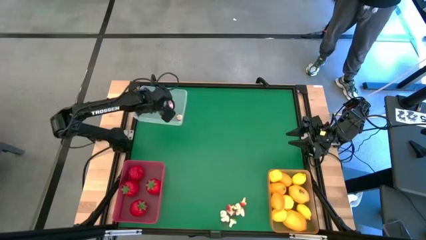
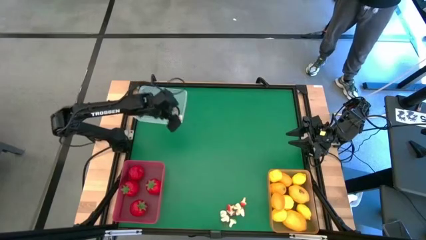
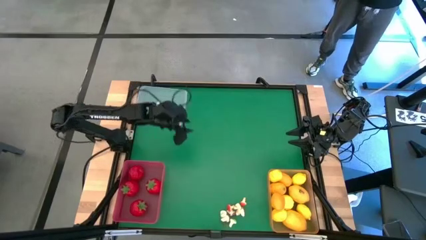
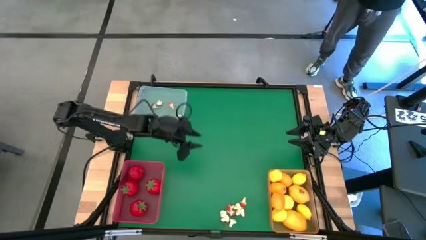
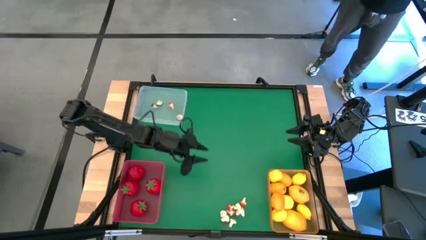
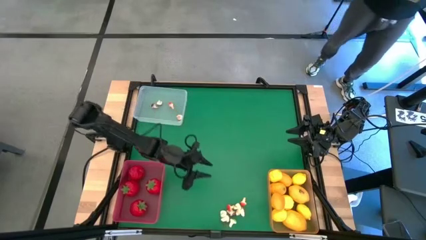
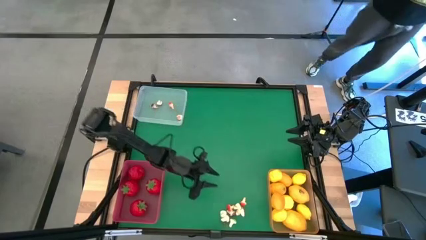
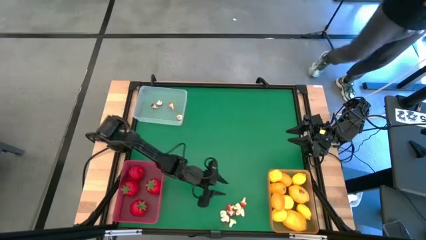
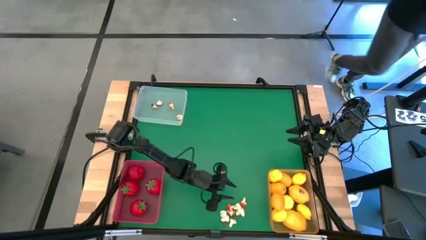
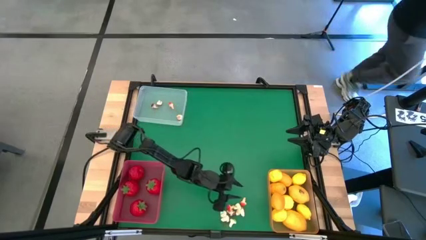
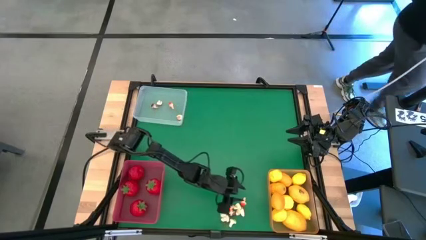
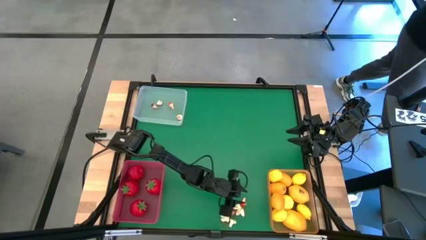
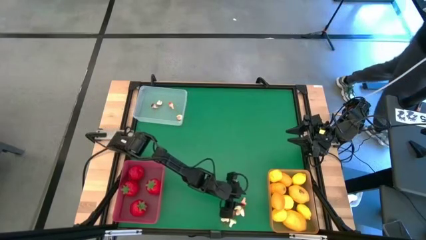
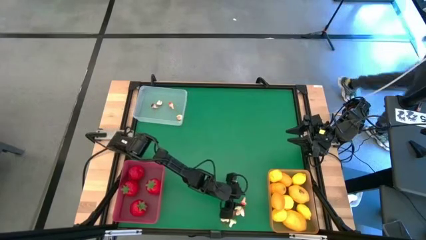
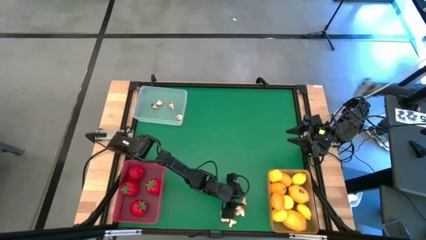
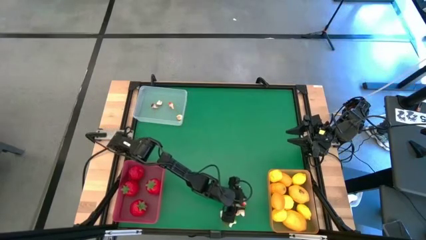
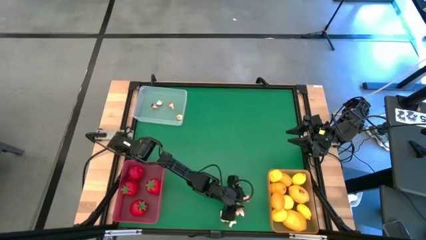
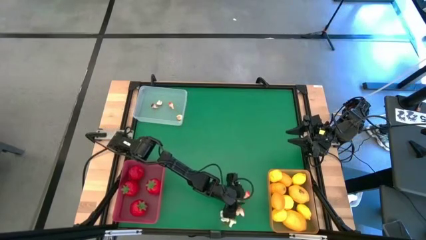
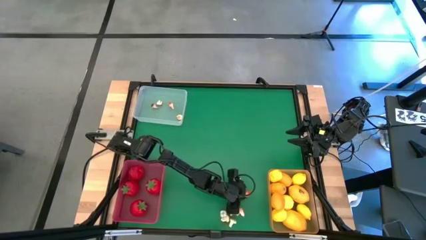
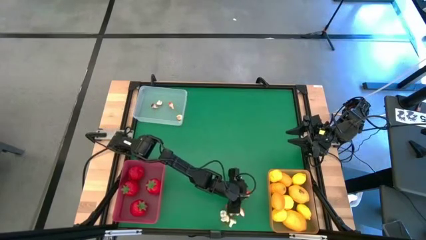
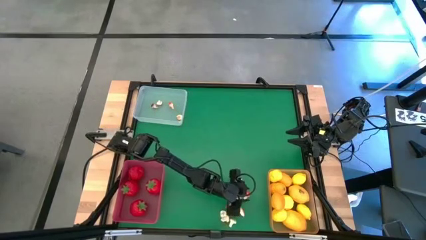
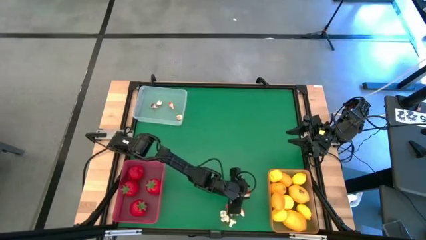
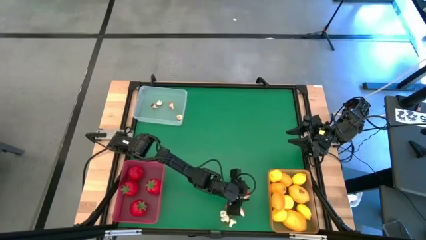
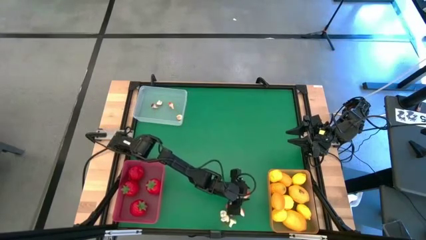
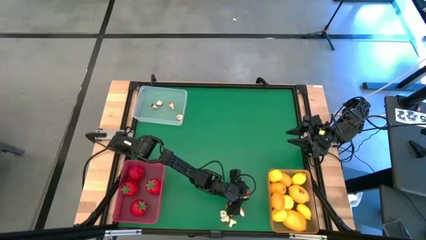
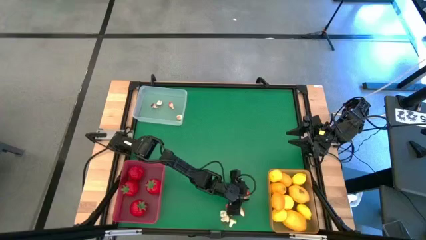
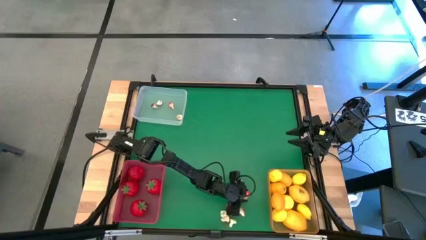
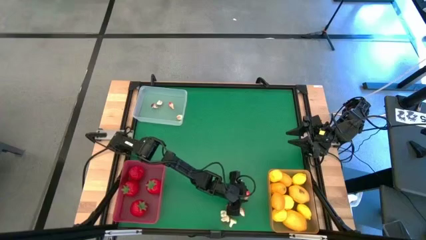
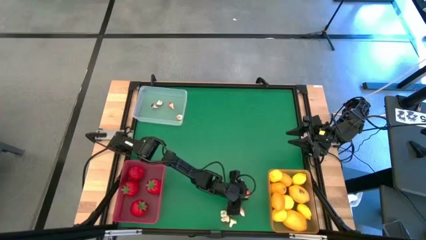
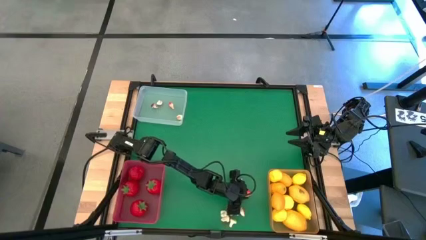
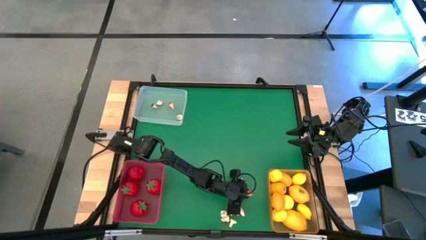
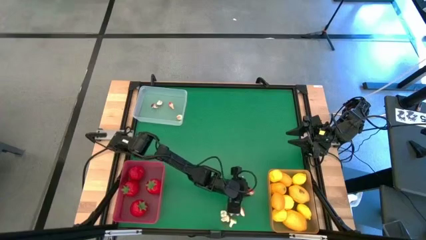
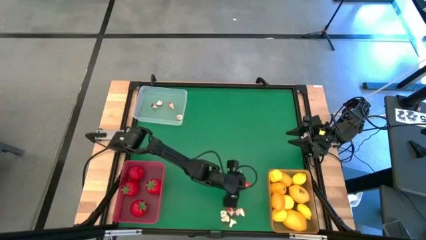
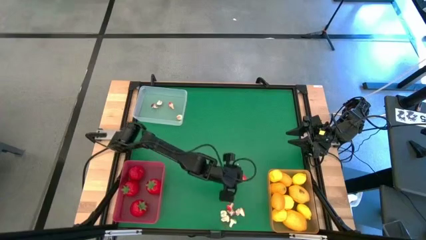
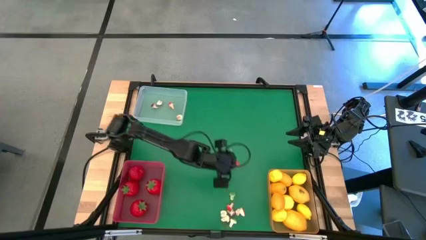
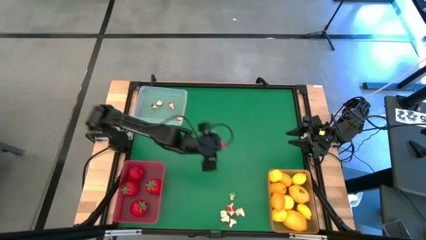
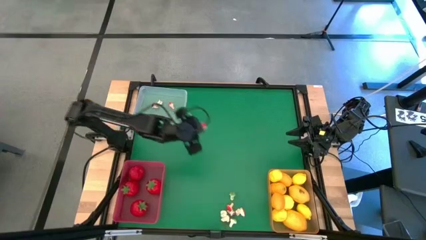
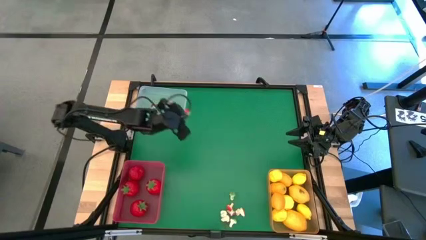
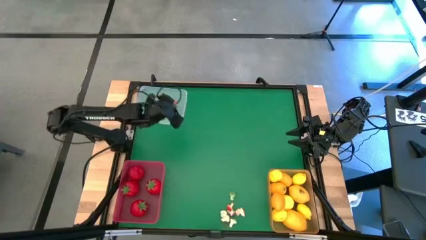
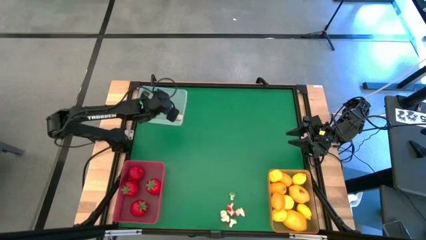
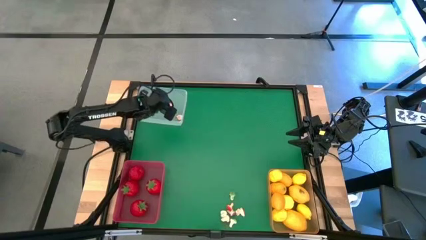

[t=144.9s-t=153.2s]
Task: Sort produce into baskets
Put the red mushroom into the white bin

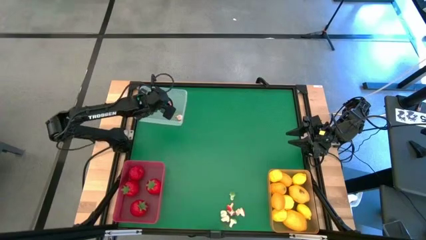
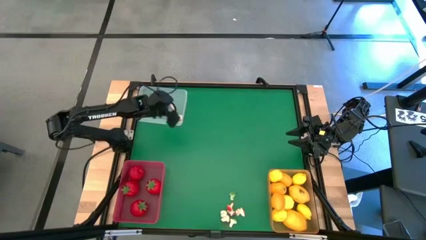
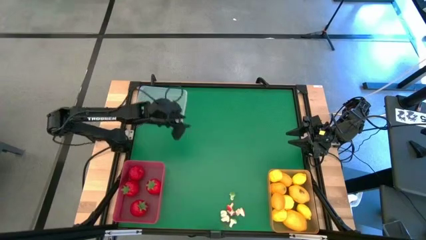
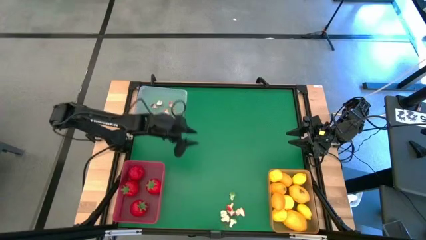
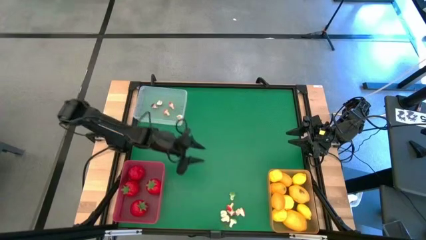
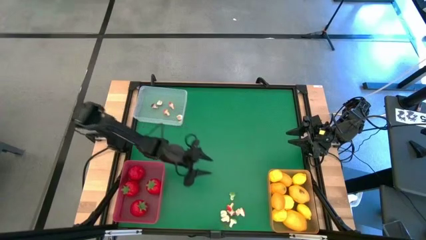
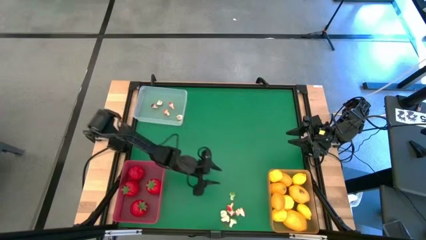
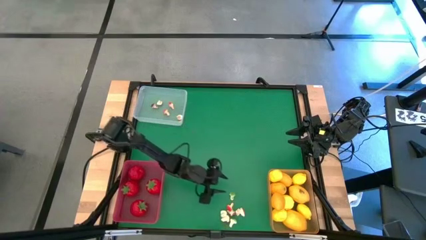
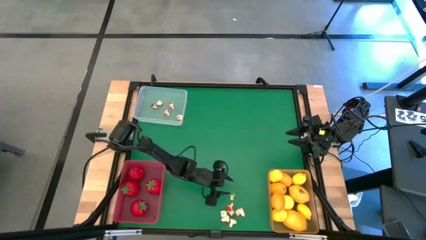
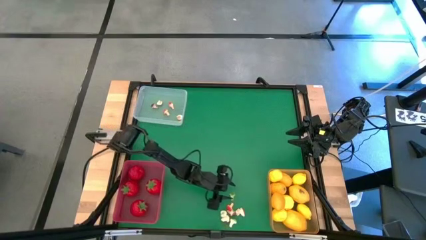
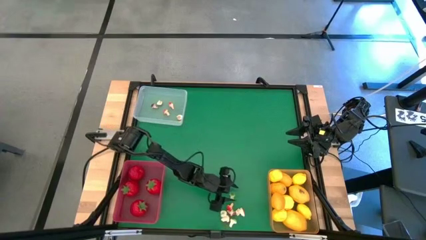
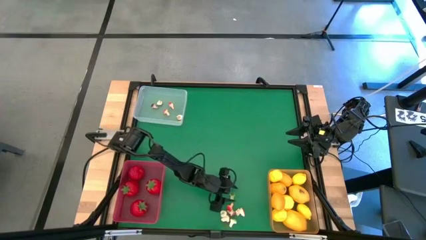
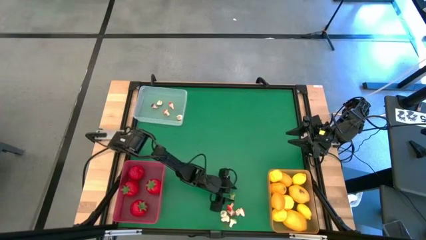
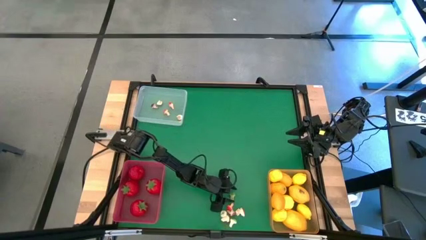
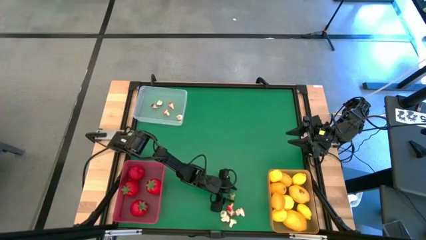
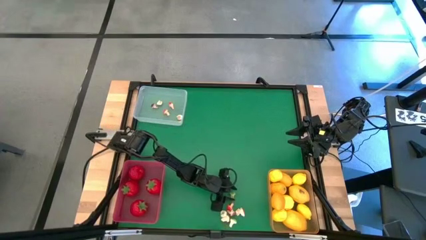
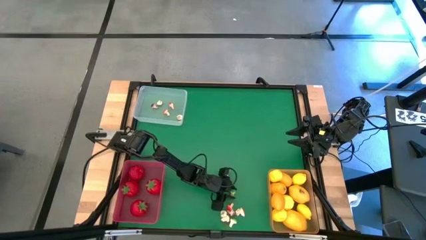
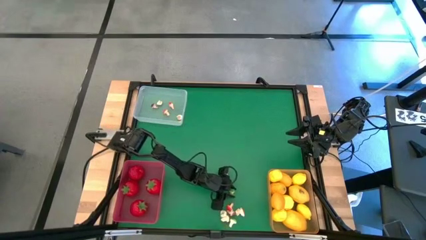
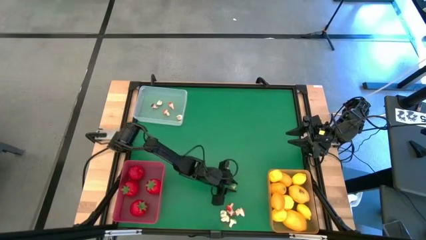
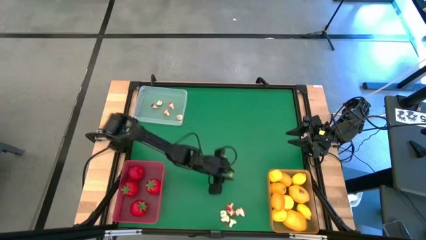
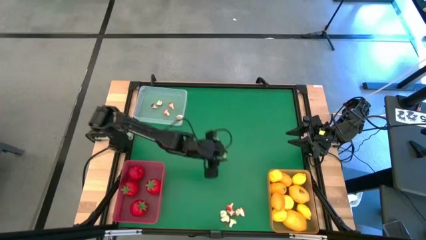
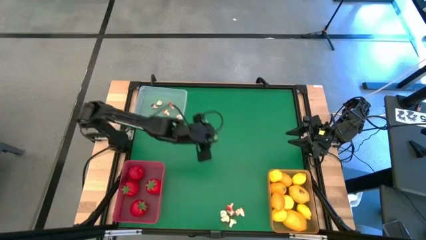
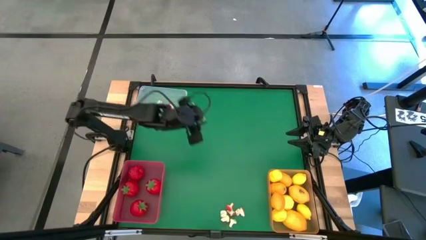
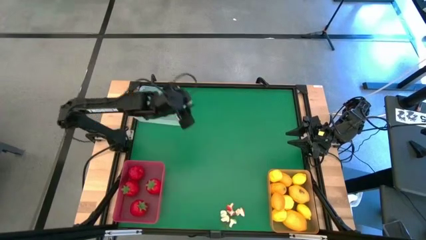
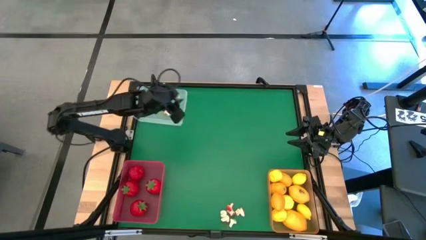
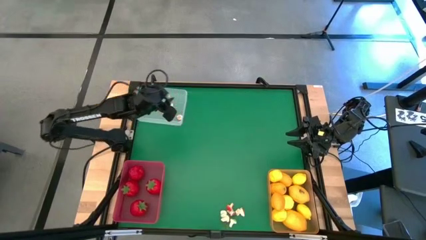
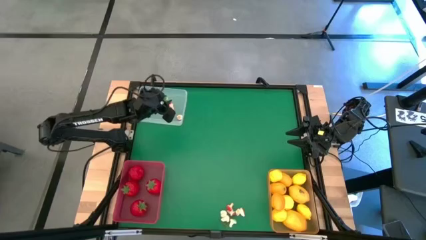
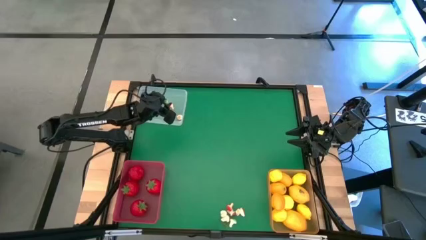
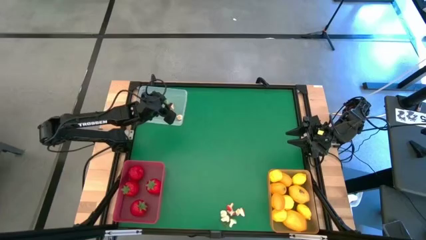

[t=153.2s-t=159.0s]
Put the green mushroom into the white bin
